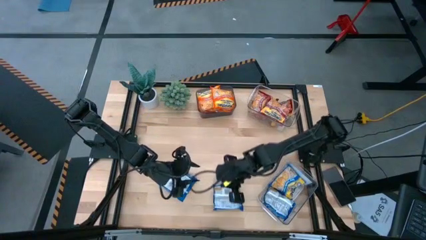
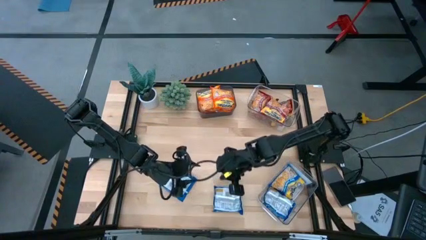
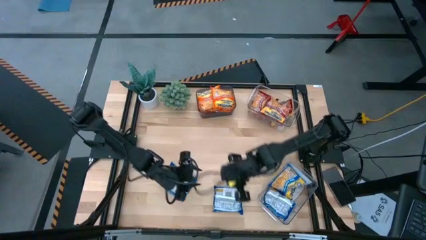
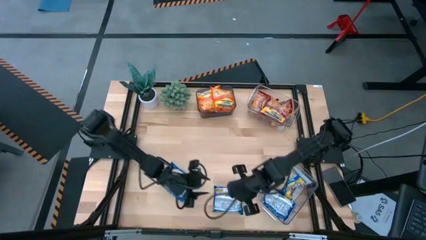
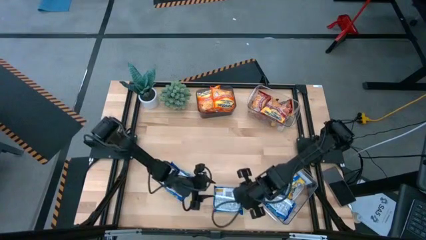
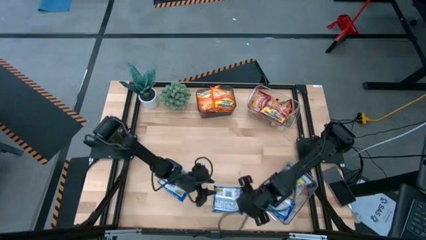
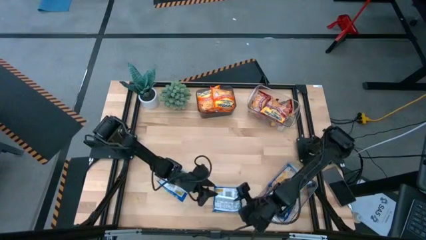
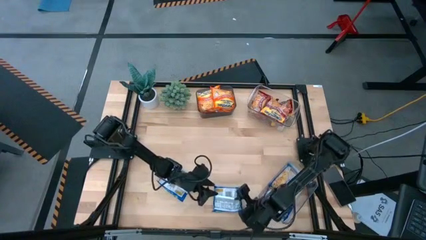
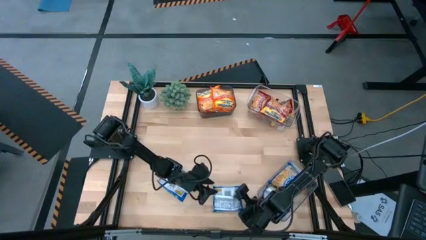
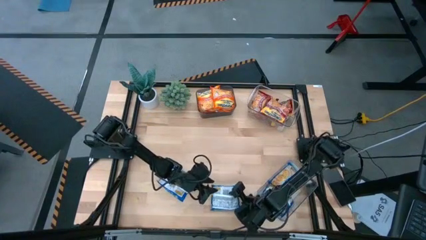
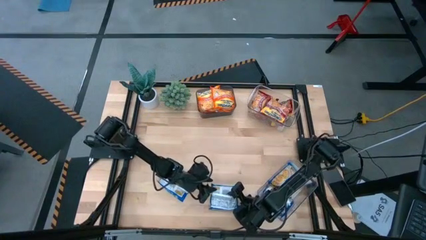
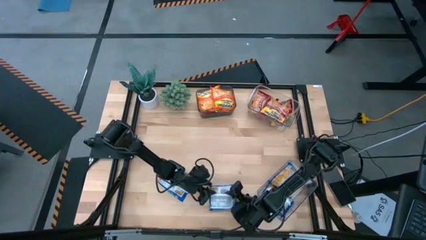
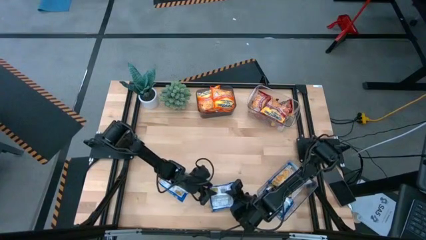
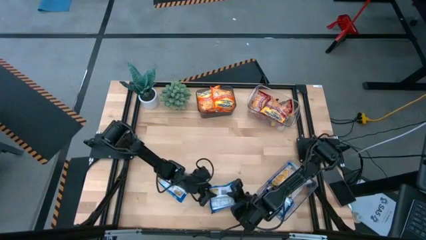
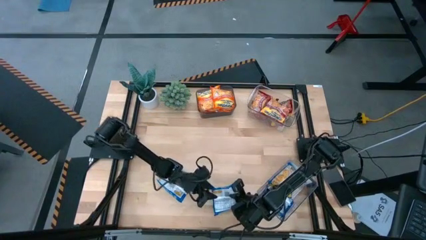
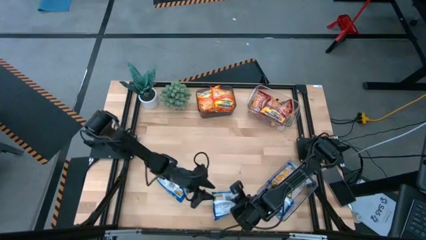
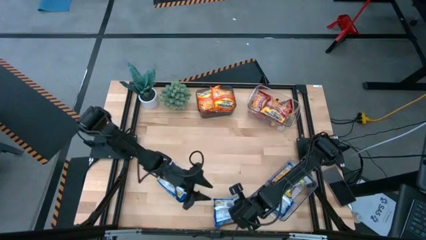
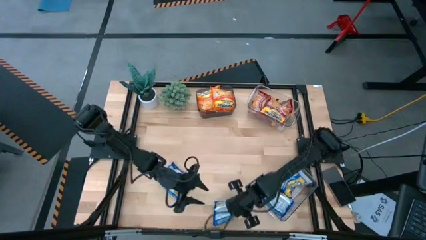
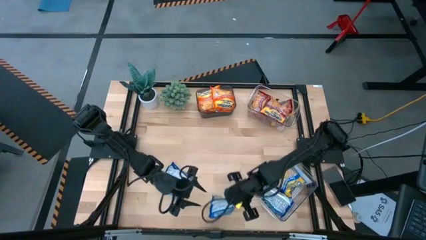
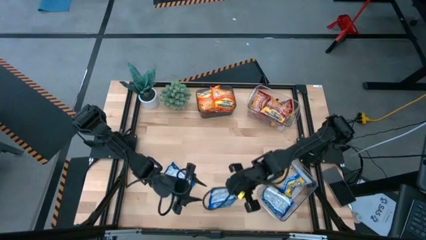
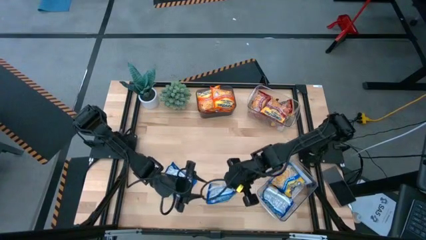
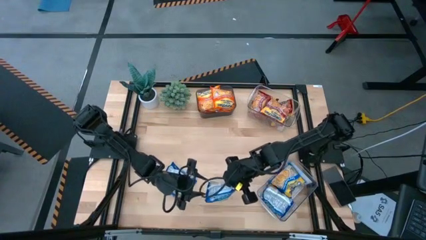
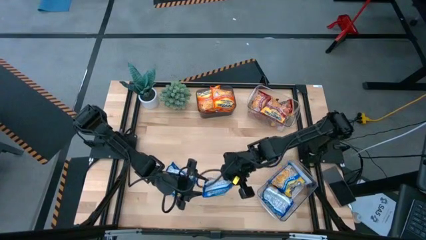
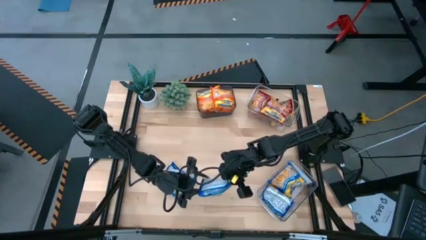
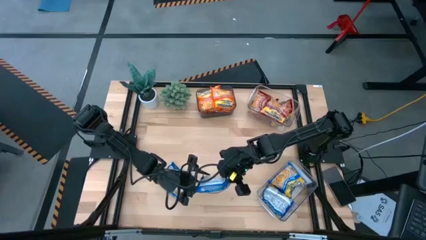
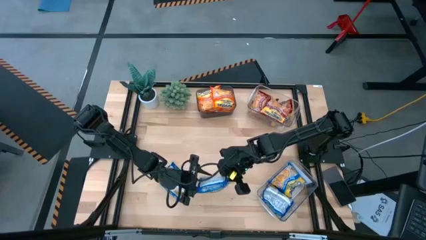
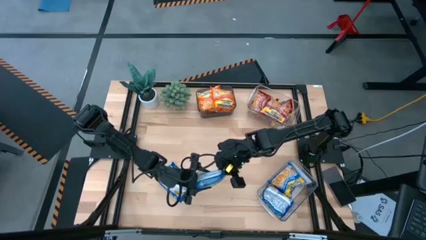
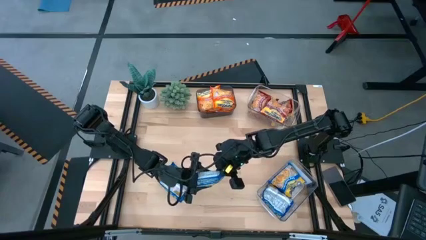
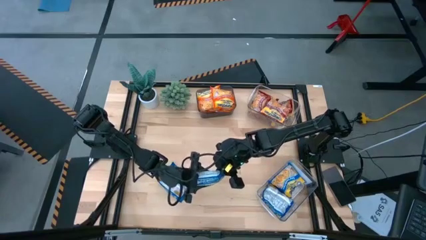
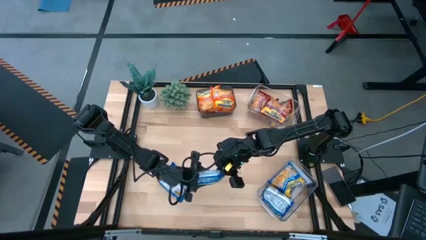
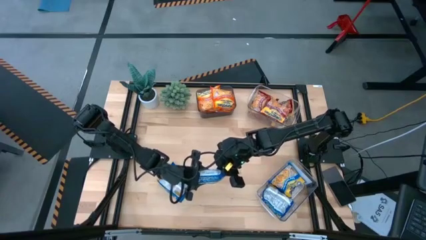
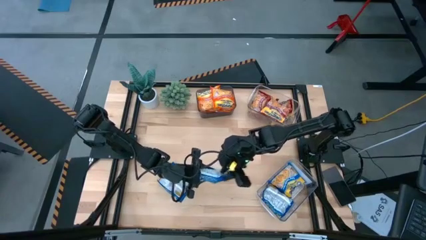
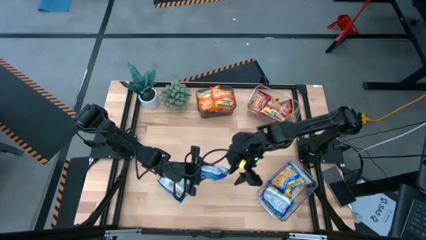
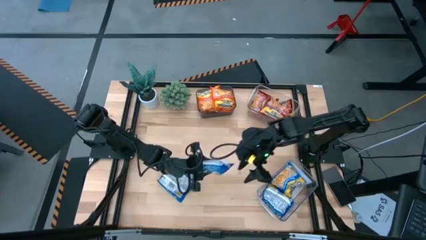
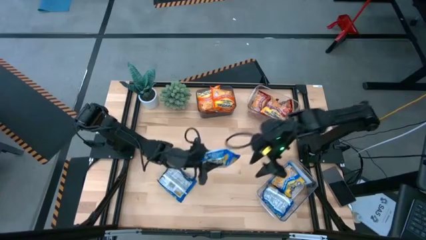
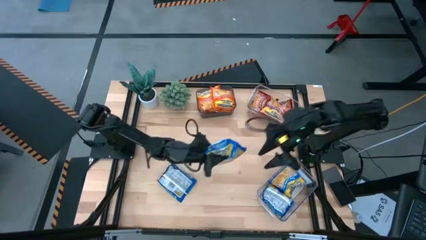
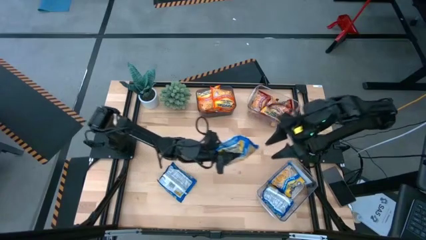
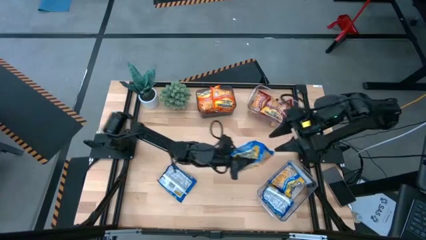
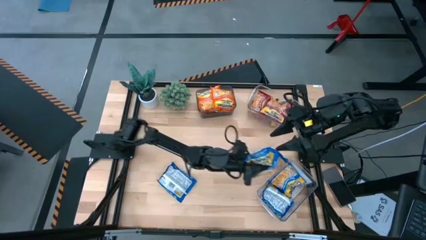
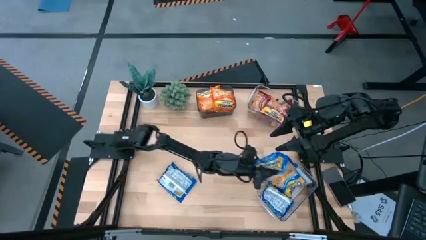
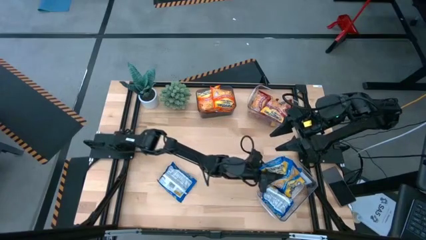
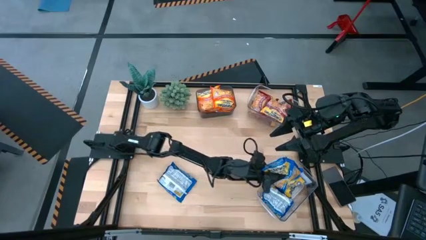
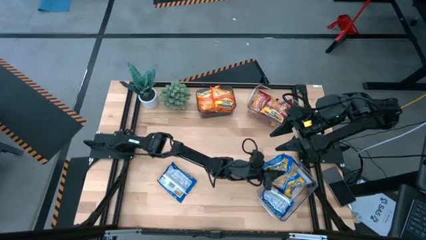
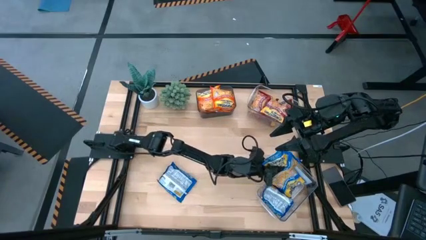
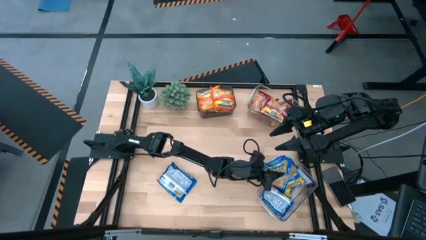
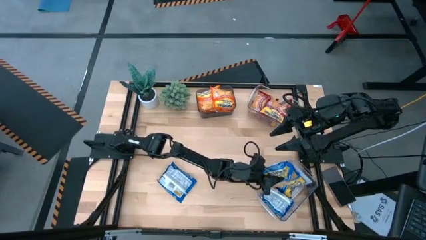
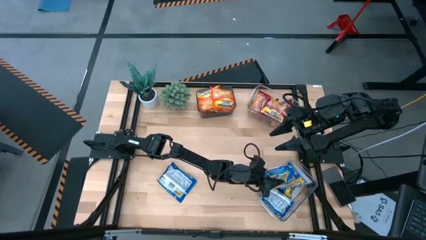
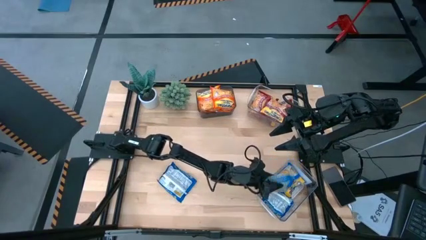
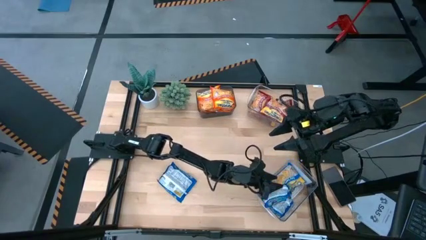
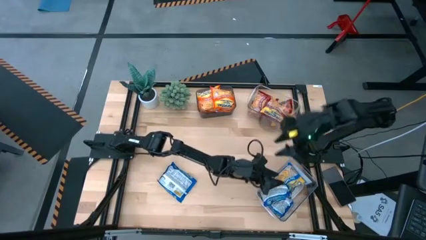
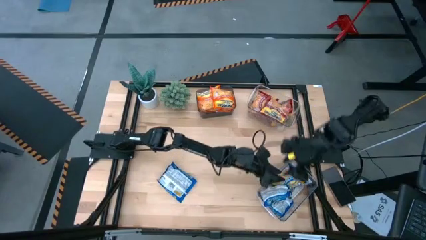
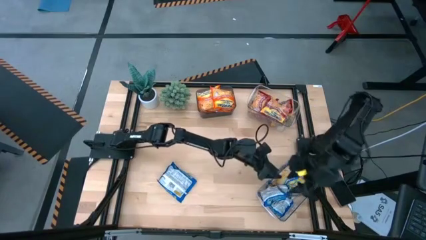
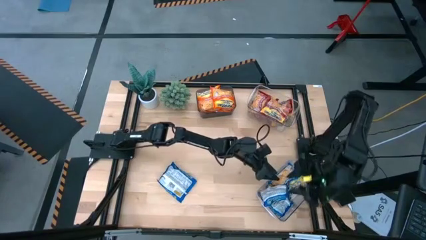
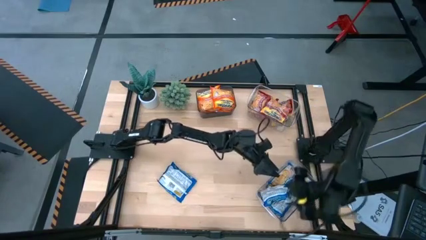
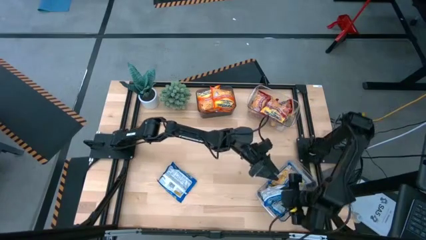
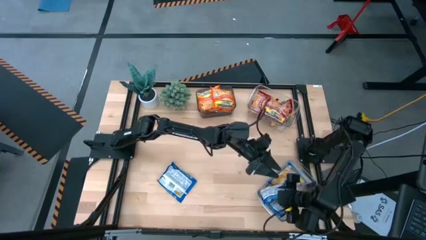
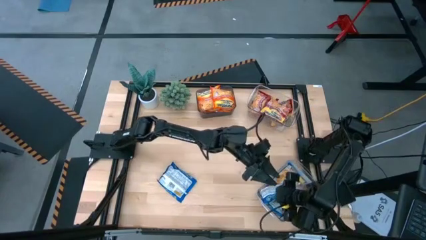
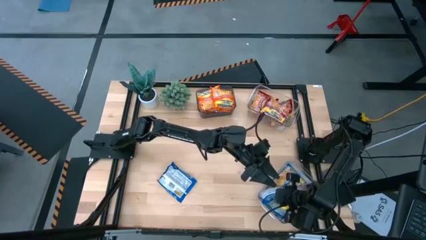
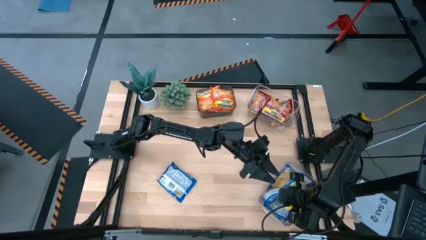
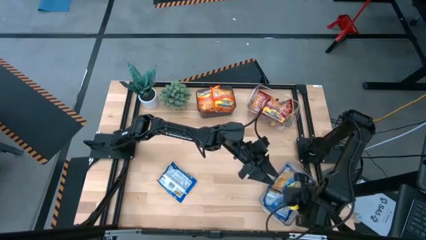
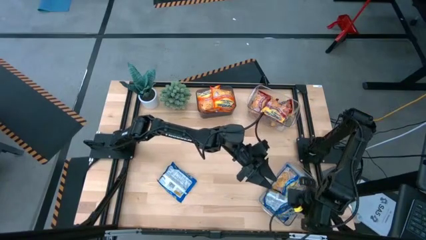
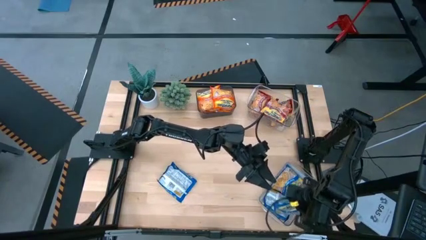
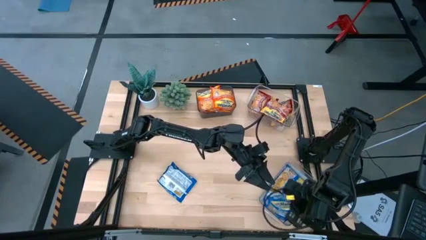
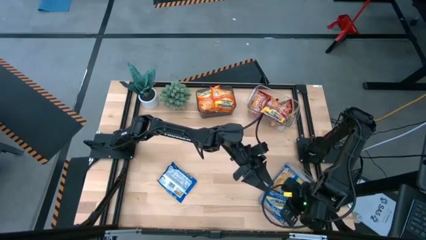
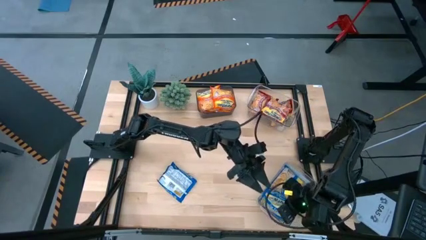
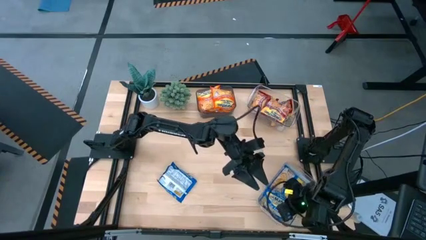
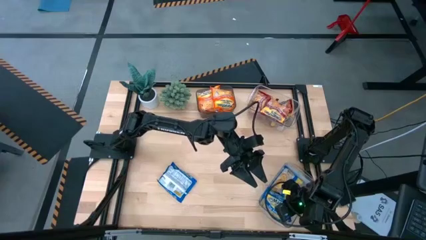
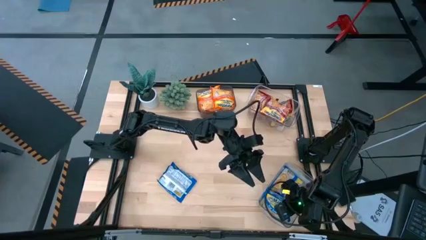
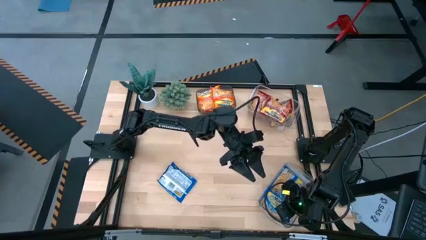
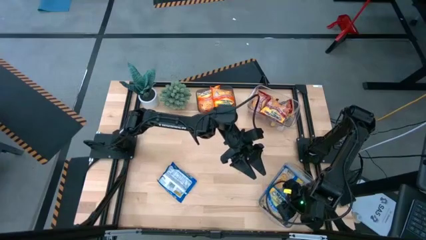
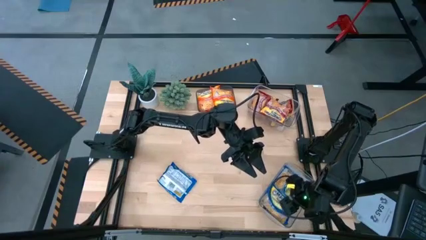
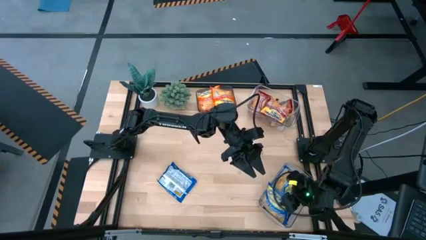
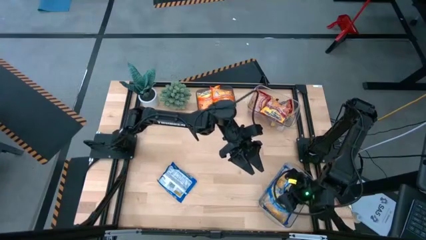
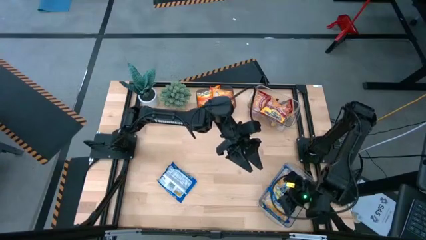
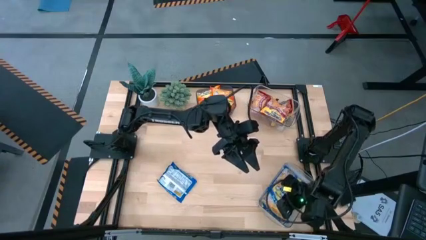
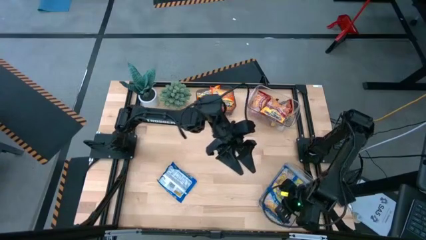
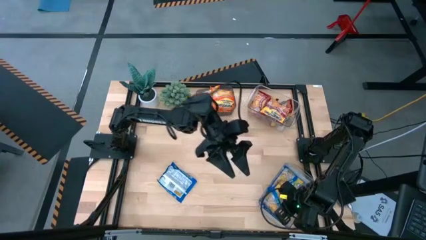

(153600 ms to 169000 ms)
Task: Sort Maruchan noodles
Put the blue noodle pack into the bottom transparent bin
